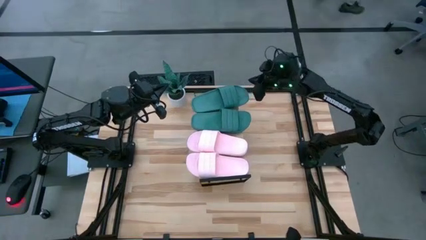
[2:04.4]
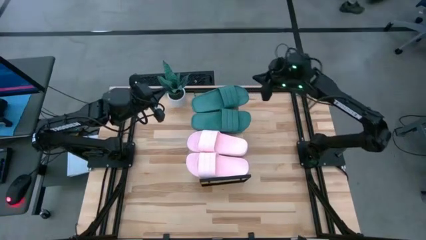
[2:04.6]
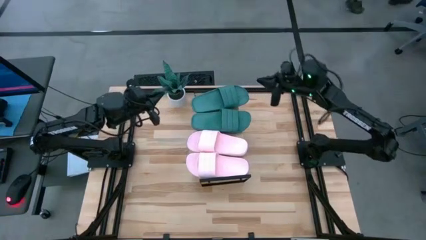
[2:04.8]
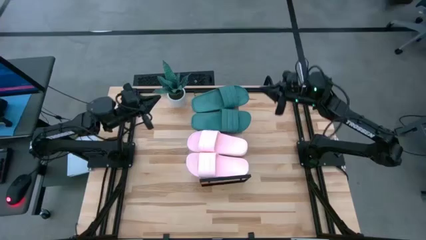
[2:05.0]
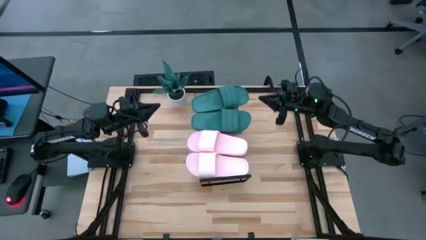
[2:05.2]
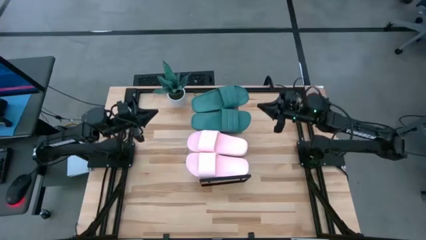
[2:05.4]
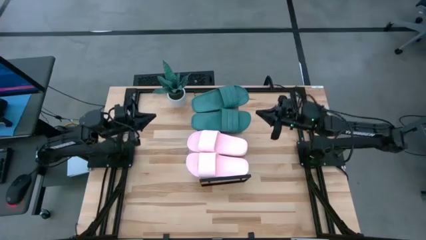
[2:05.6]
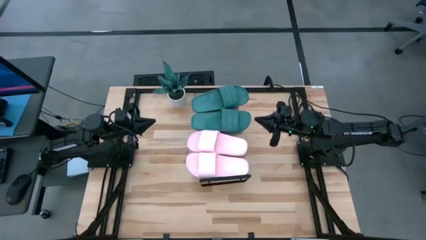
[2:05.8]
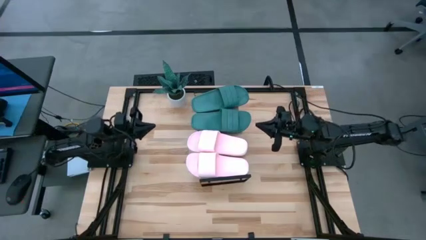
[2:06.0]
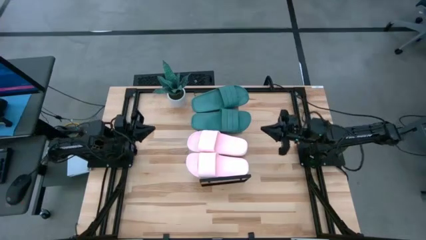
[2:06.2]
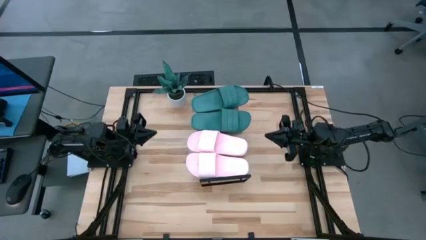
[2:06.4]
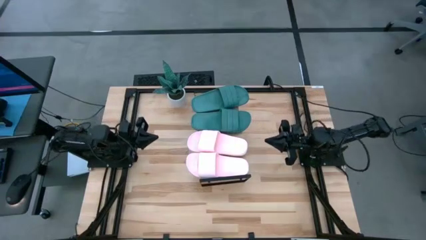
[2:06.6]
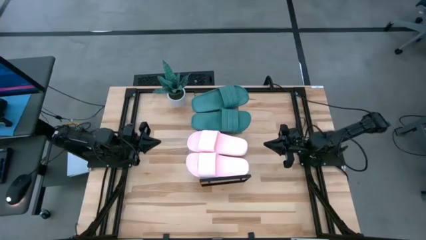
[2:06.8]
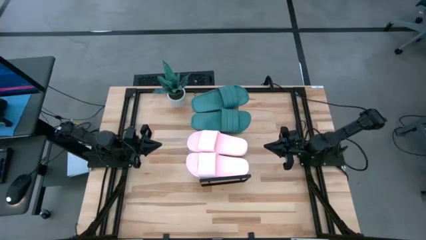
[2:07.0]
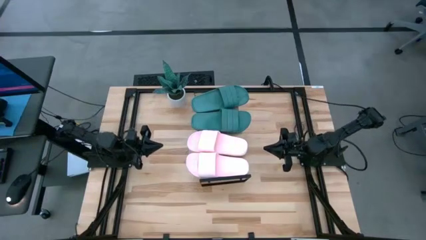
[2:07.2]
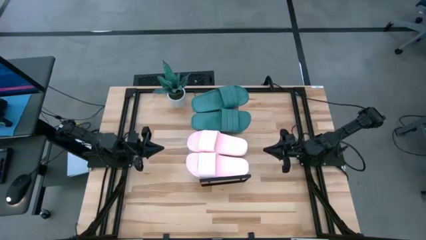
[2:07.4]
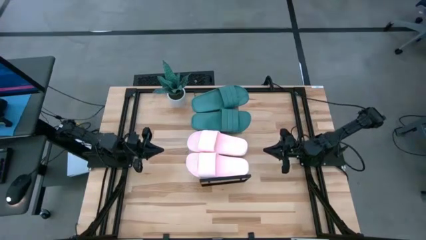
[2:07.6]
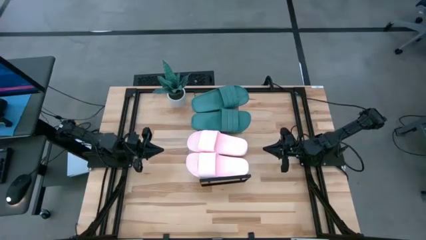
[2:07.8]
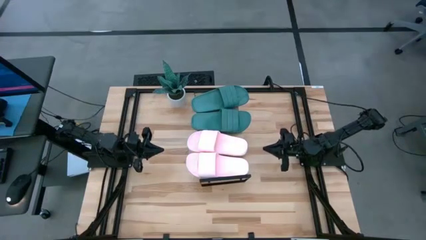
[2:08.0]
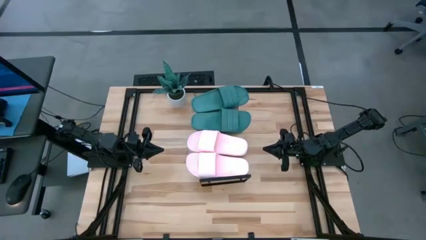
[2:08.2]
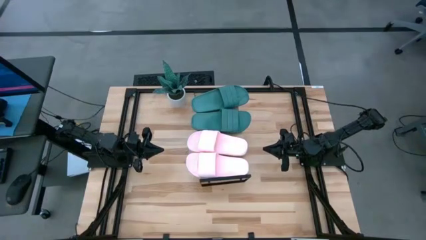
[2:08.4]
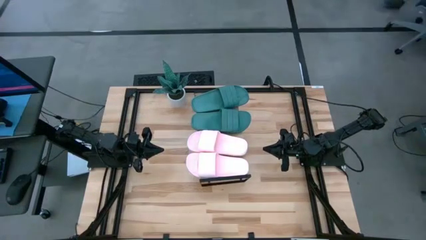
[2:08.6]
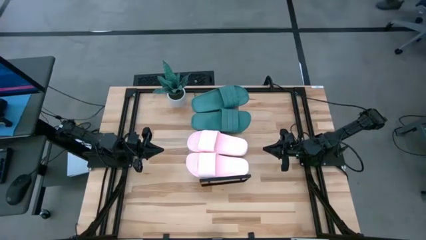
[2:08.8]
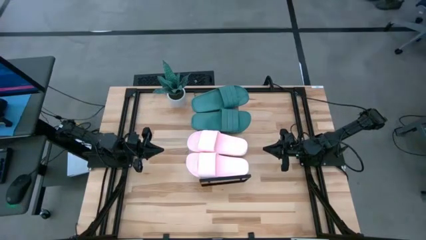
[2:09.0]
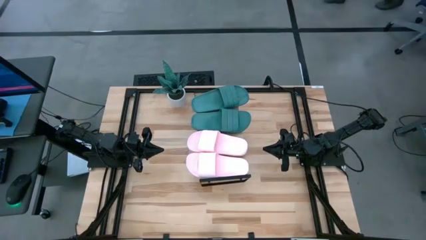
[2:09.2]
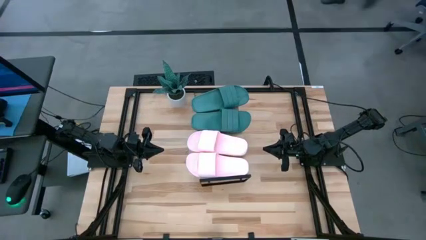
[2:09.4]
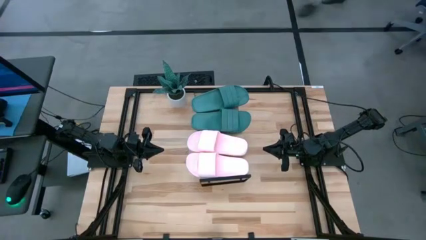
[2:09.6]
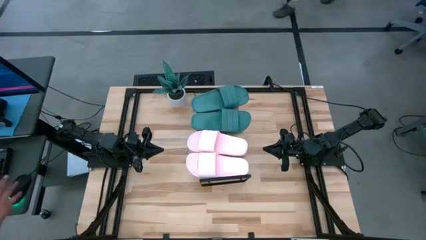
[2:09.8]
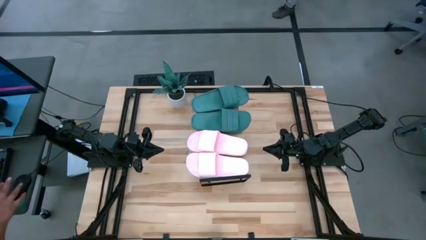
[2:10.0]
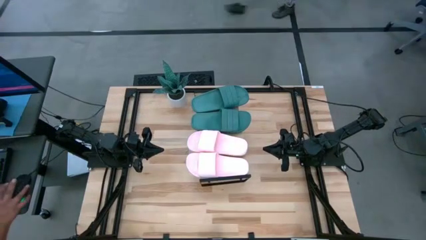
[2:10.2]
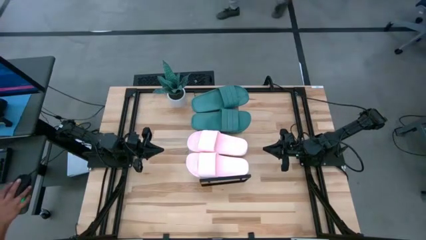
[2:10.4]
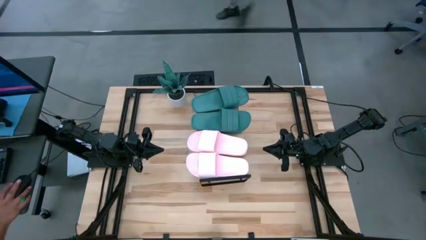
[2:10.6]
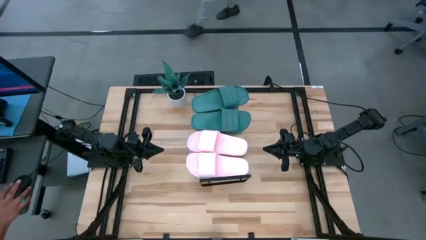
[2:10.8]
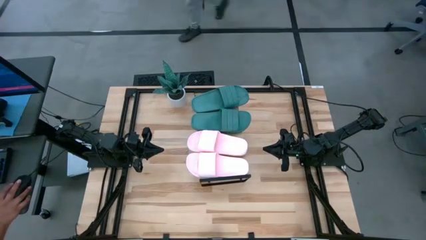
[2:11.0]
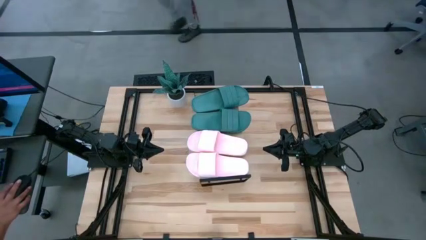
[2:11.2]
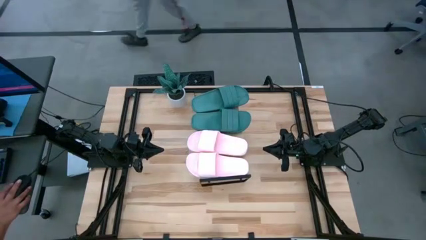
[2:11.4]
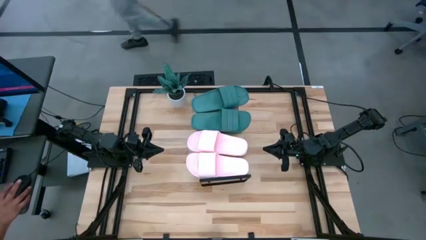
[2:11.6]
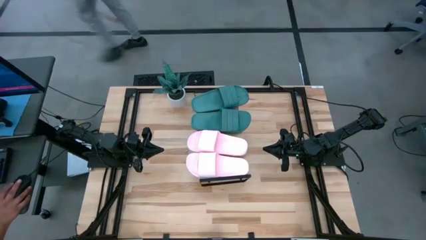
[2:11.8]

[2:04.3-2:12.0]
Task: Pick and place slides into the shelf
Return to Home Position

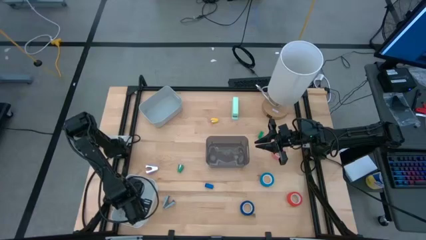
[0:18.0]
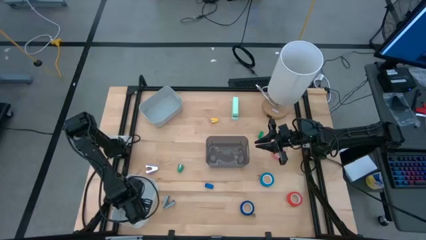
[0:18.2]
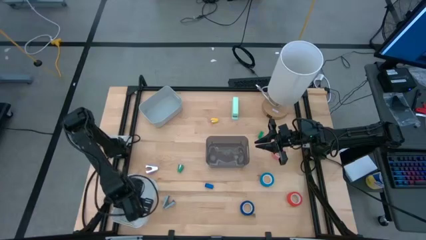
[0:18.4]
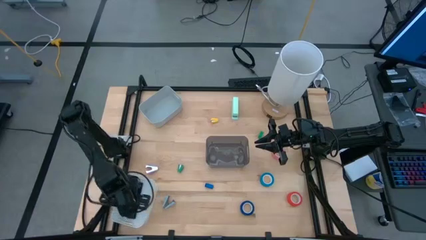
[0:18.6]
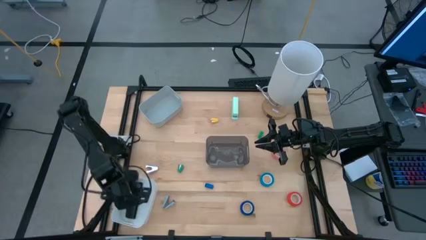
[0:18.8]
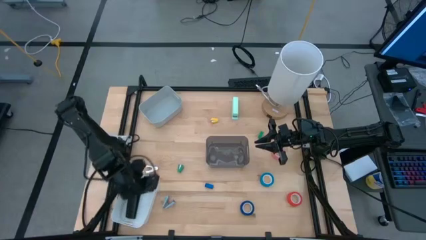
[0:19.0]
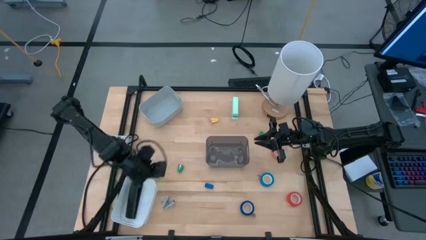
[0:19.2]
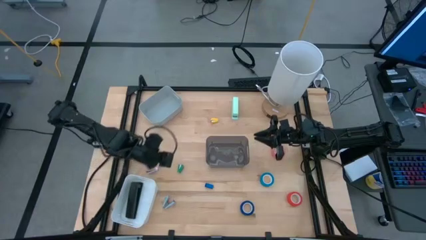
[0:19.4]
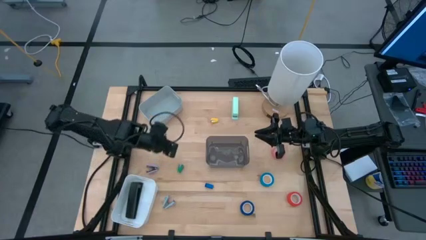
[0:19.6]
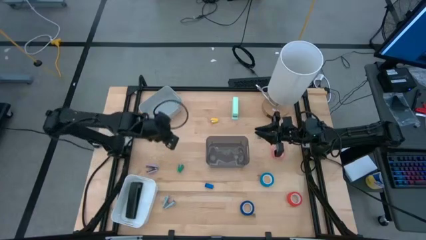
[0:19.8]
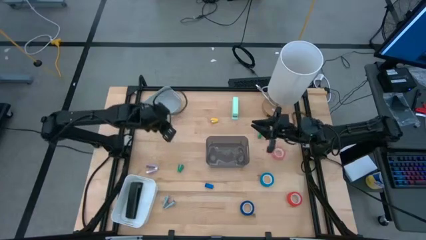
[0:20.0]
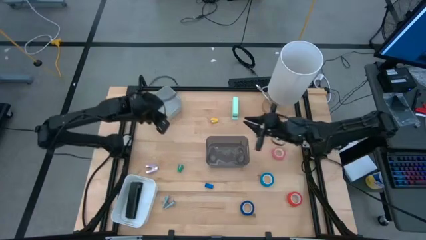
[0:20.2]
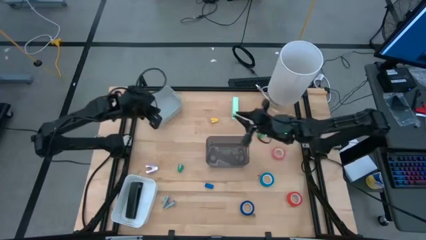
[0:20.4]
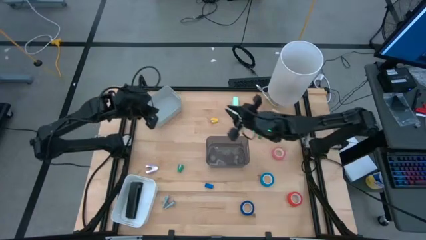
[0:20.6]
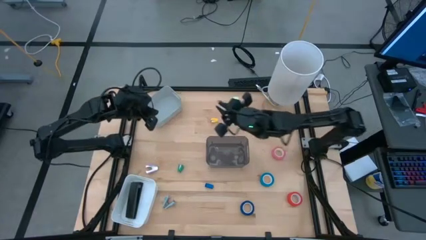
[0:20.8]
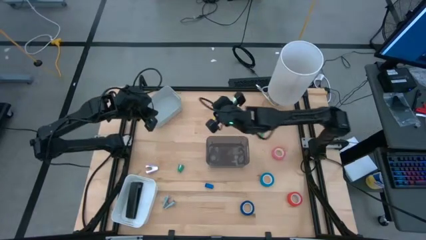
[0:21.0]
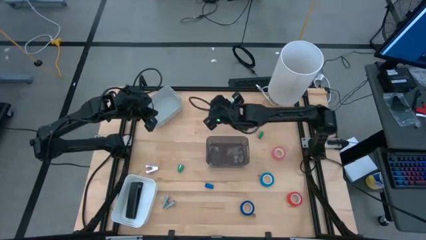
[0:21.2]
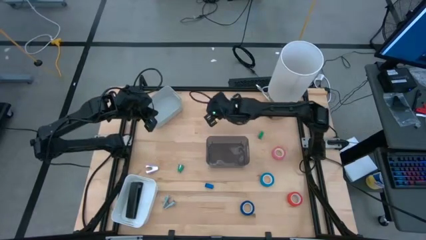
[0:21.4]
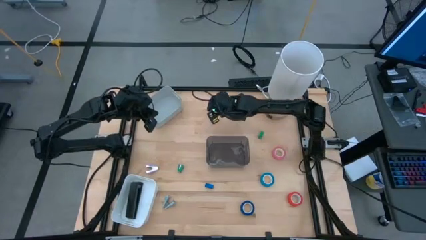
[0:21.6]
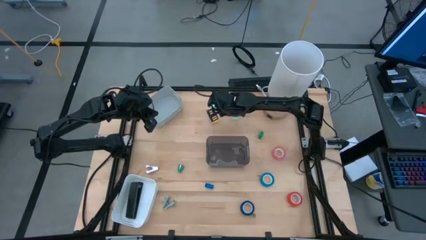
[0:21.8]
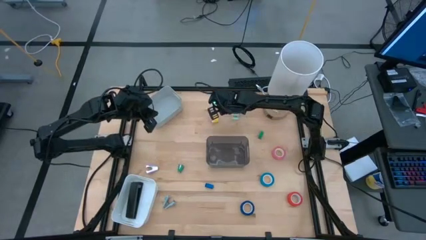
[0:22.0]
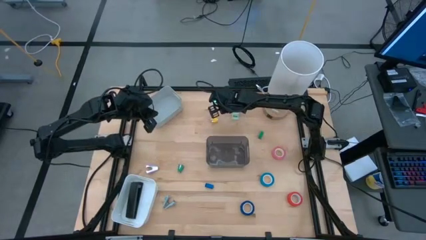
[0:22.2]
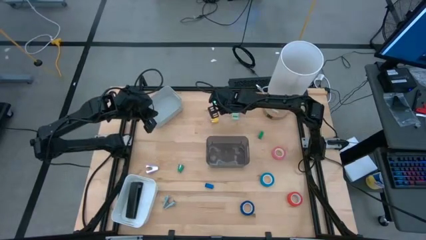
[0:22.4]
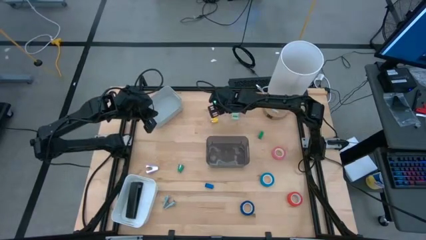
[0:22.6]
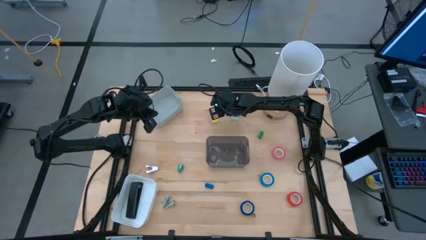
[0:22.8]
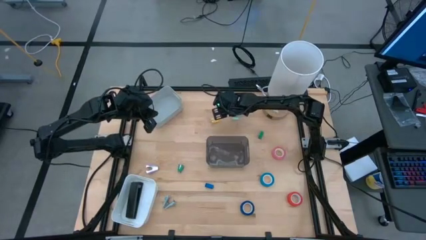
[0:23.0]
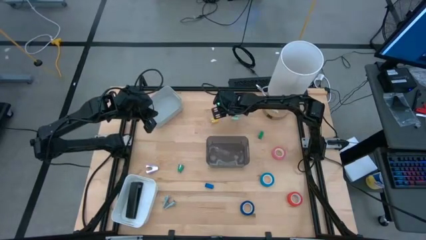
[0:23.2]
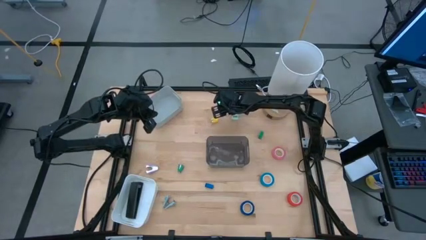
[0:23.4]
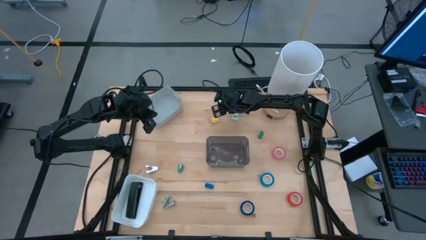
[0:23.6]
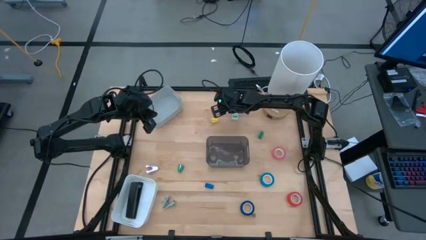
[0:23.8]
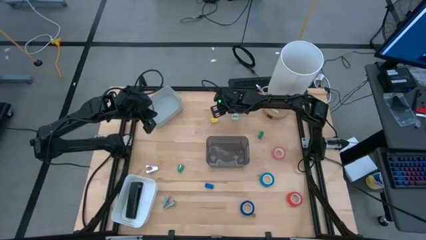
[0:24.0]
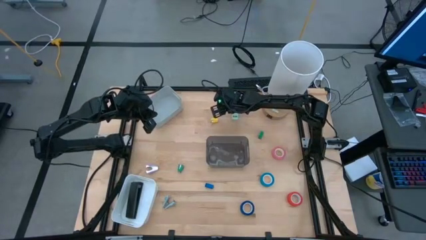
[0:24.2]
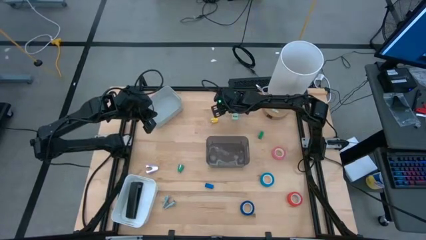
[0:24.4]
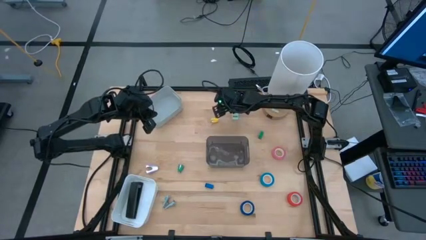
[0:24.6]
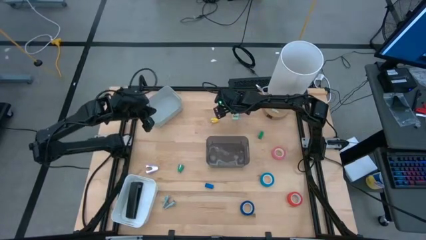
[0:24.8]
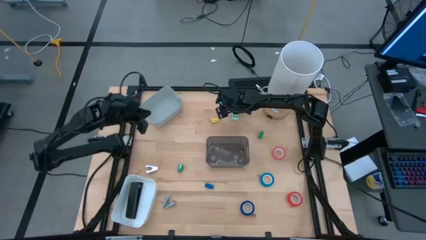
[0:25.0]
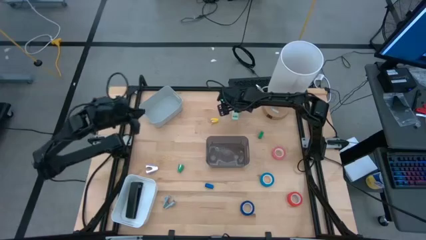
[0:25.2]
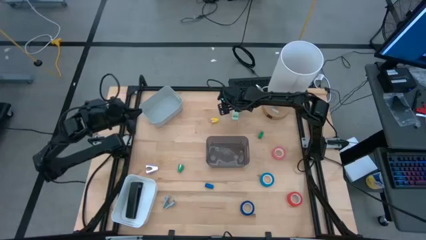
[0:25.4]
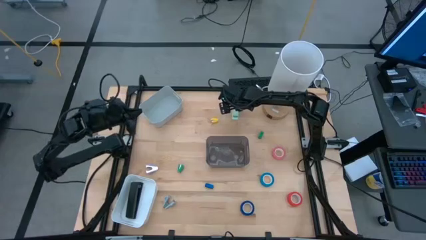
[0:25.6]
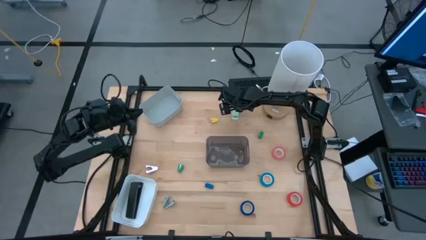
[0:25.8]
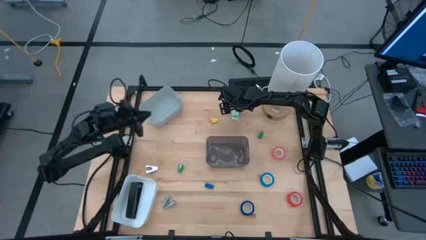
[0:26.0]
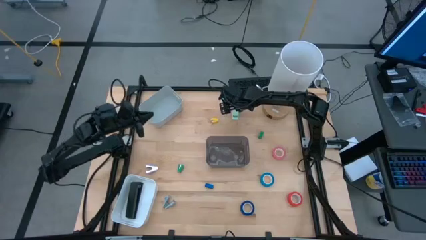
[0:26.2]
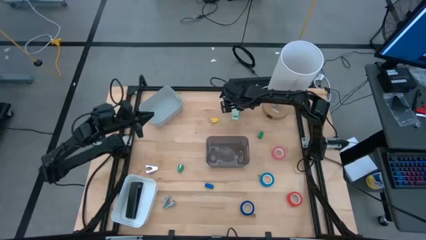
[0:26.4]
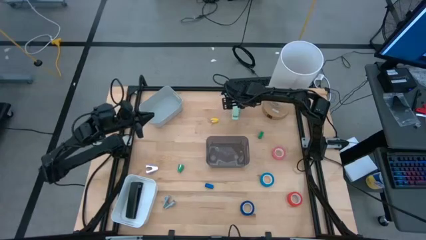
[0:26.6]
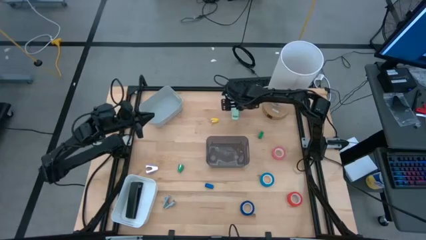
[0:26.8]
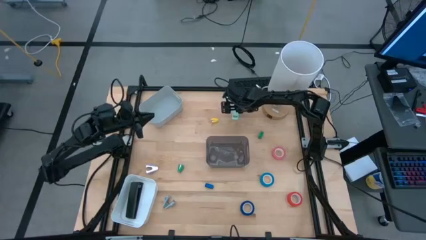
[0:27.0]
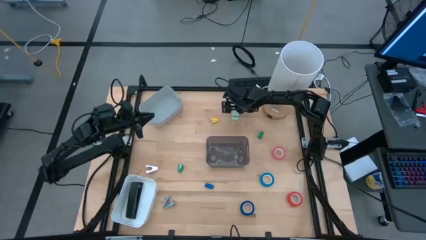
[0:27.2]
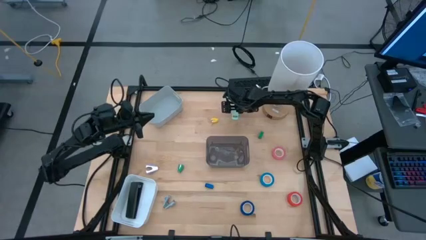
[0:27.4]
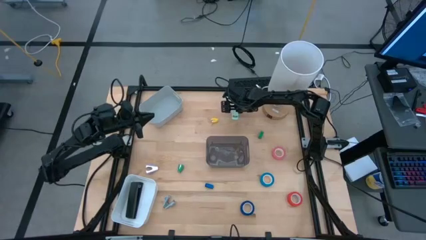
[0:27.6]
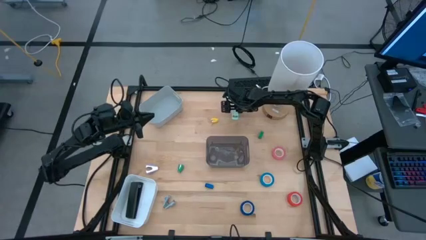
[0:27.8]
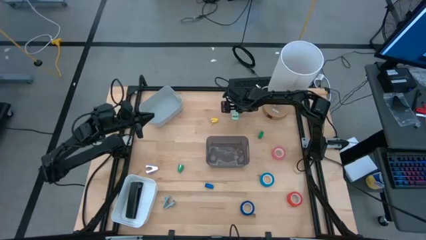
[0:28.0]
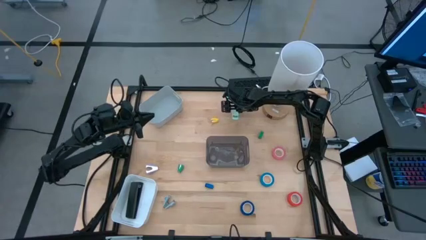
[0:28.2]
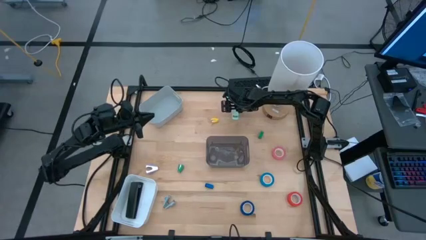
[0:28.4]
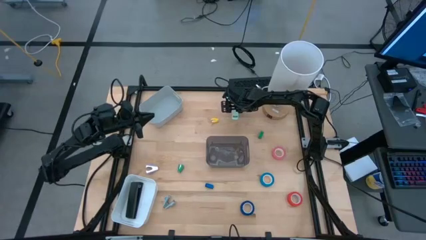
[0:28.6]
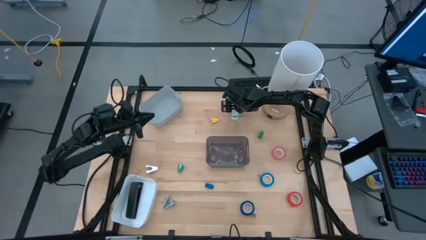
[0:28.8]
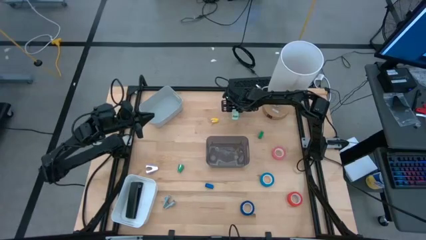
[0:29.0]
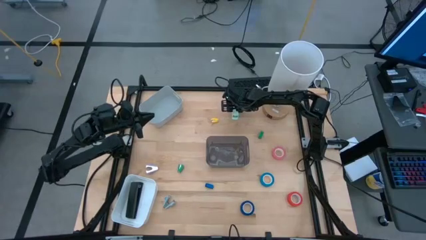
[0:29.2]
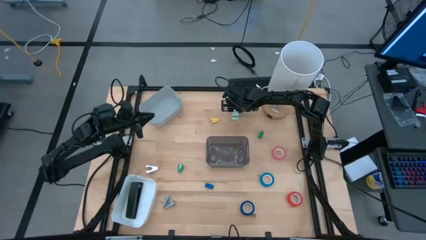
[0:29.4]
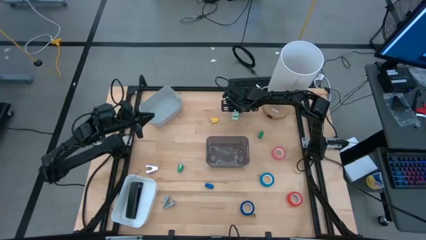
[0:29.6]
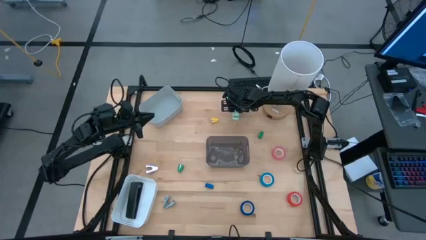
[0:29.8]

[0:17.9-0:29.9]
Task: Pick and place Stapler, Stapler remover, tape
Put the large light green stapler into the white bin
